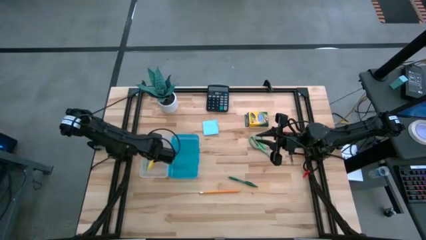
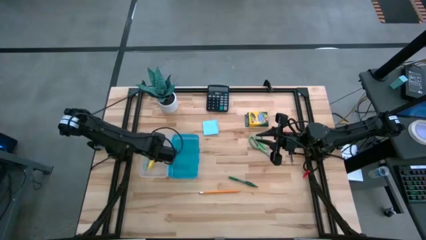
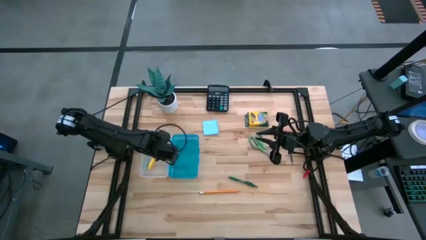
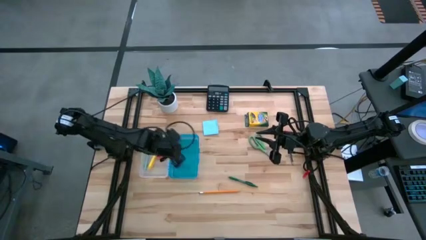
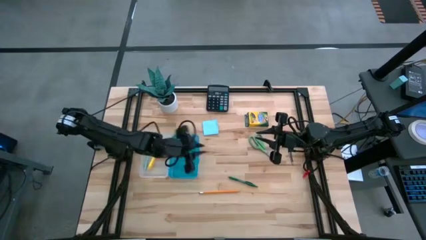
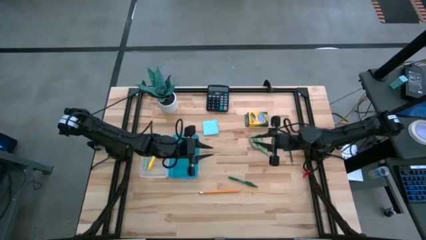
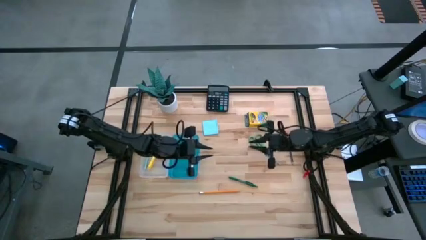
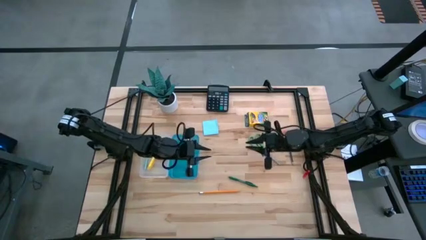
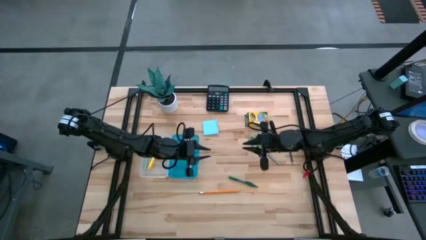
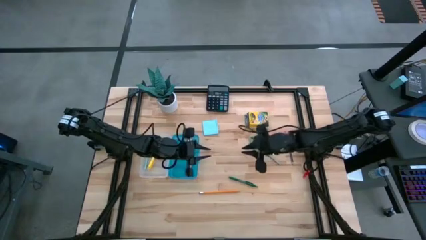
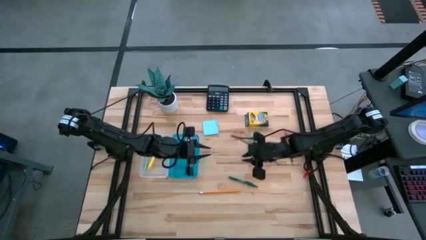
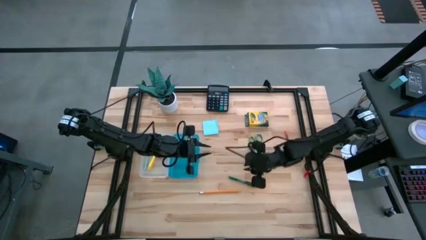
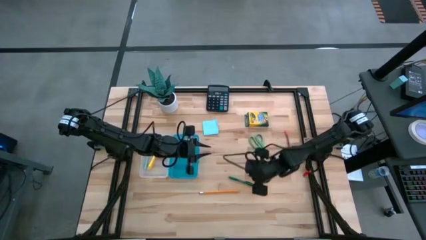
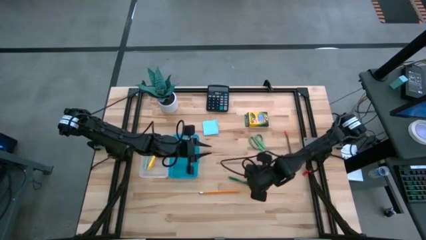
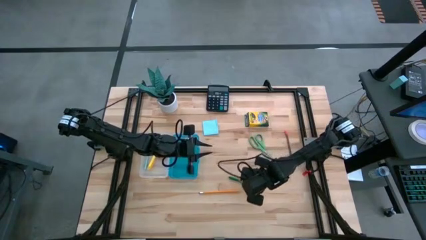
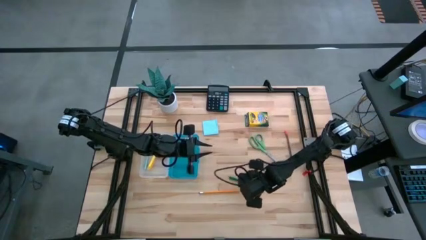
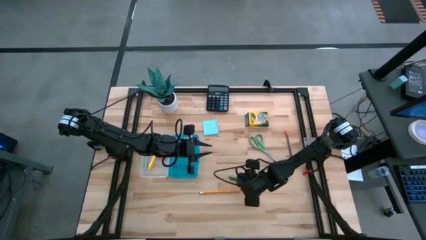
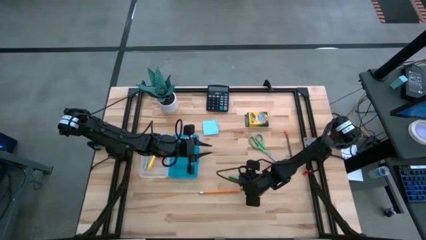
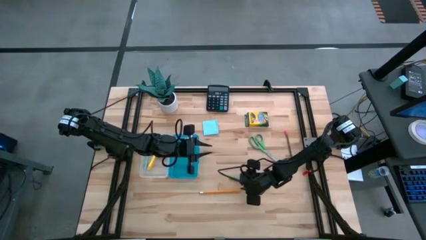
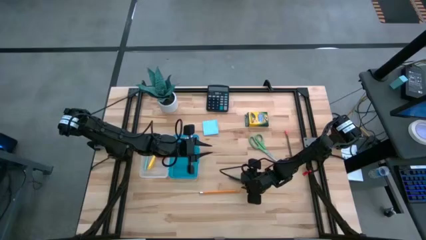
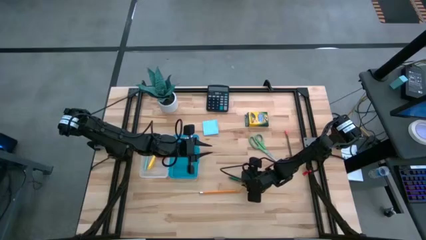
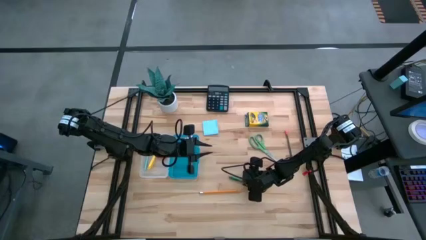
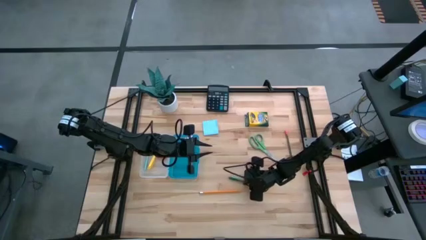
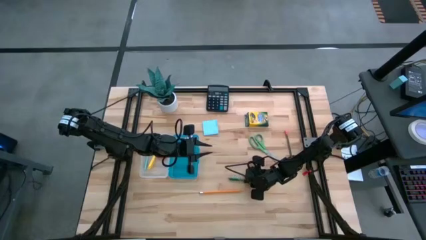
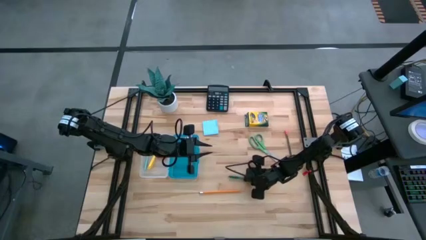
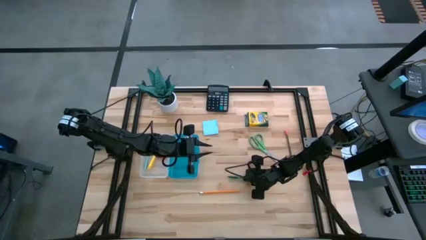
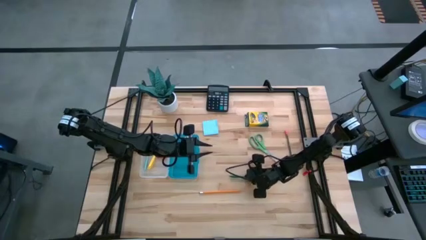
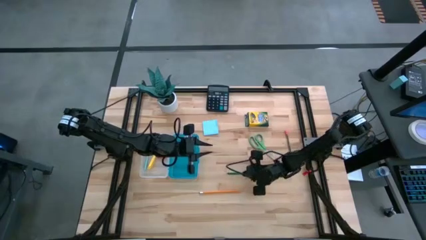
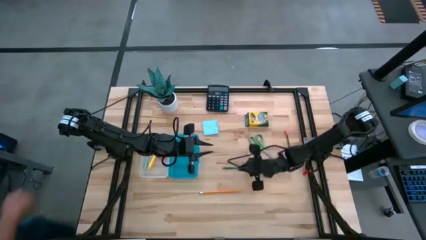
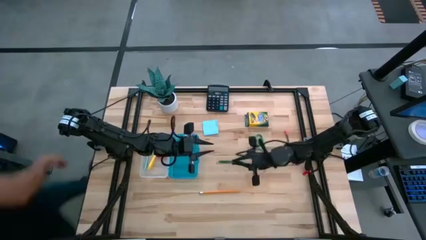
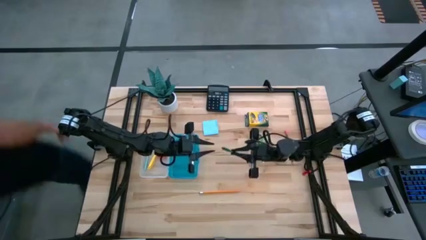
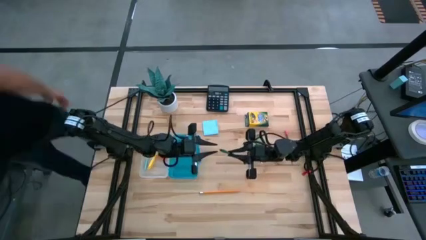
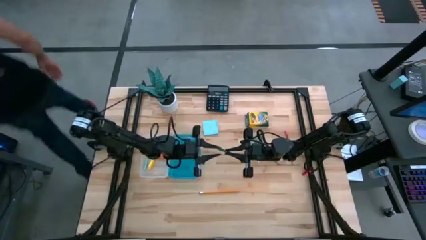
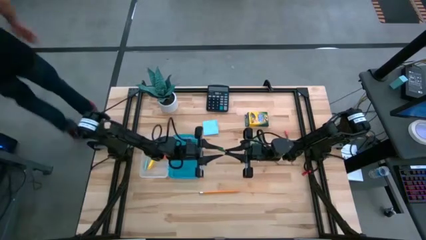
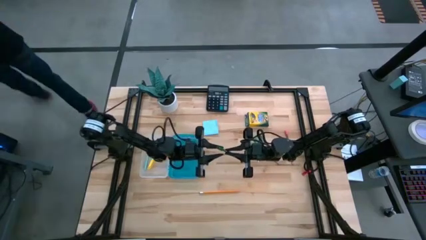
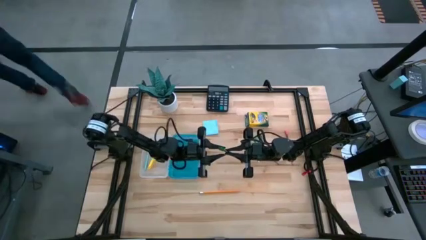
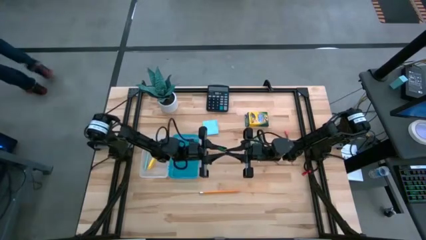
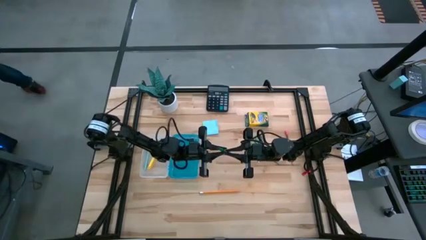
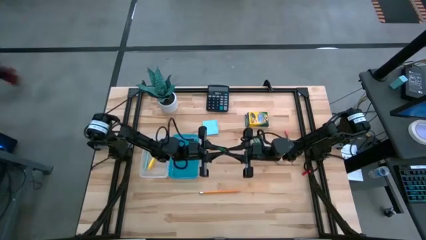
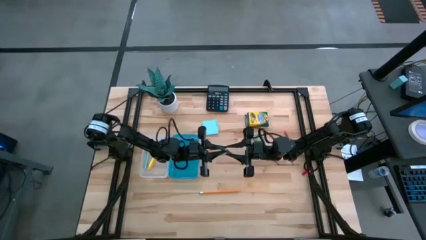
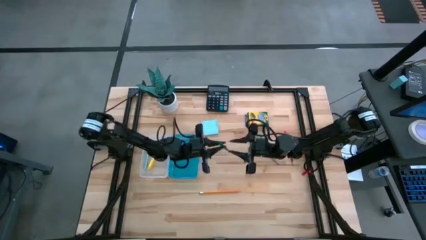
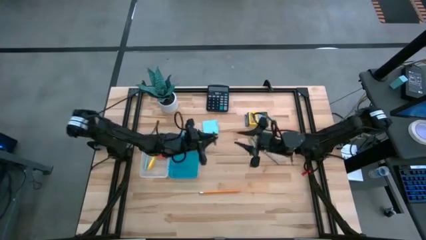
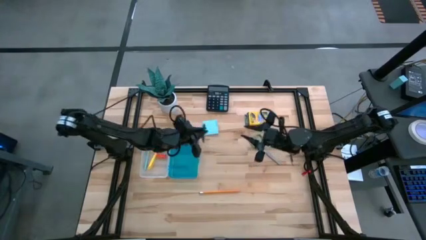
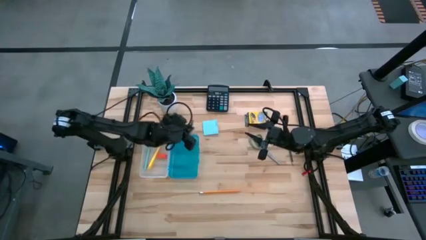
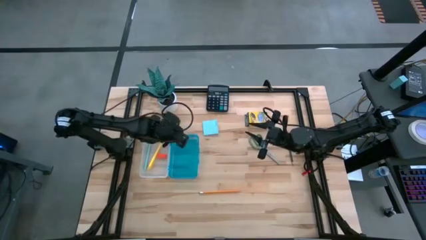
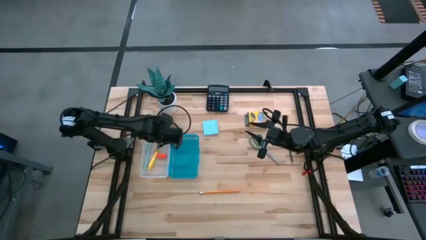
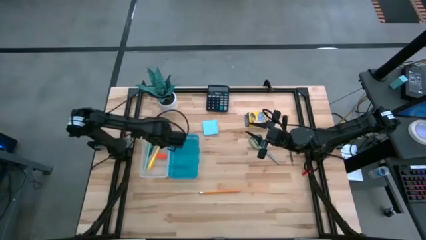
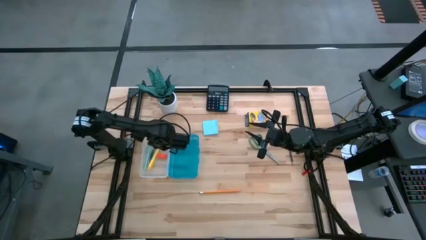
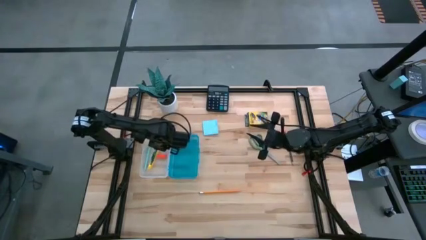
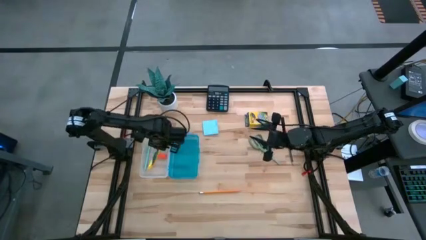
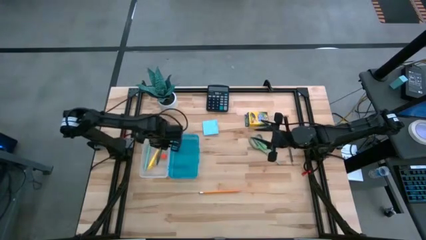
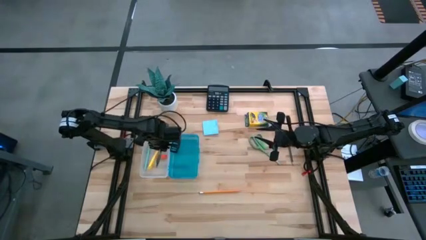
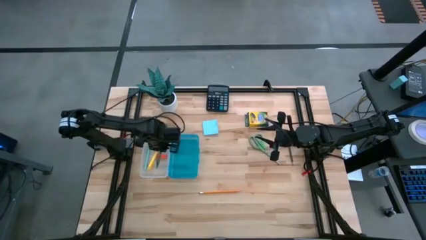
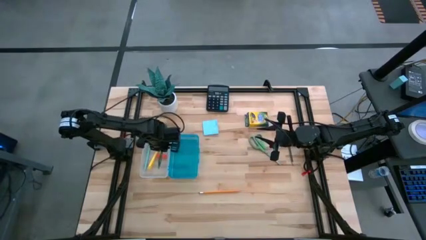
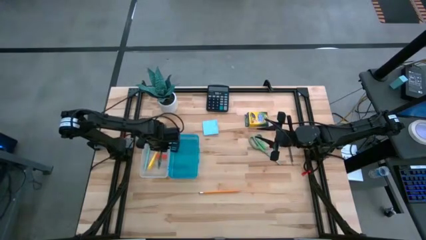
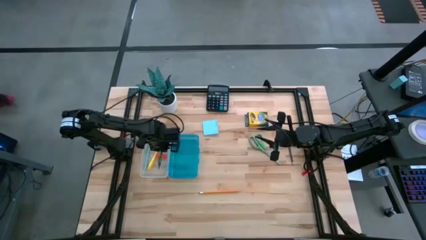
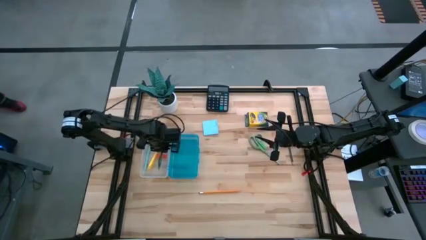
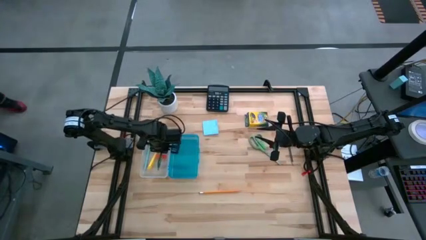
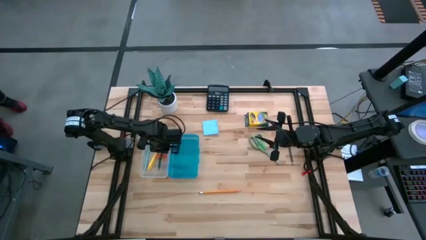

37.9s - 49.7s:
Task: Pack school essentials
Put the green pen into the blue supply box
